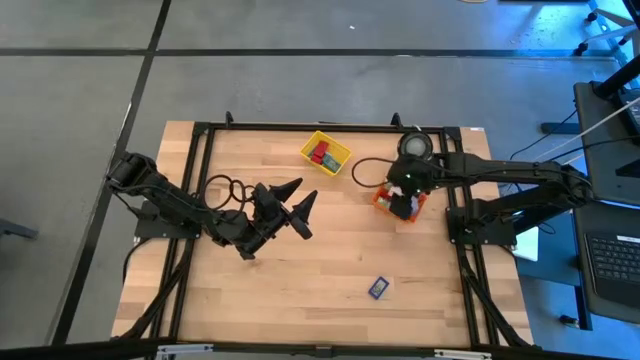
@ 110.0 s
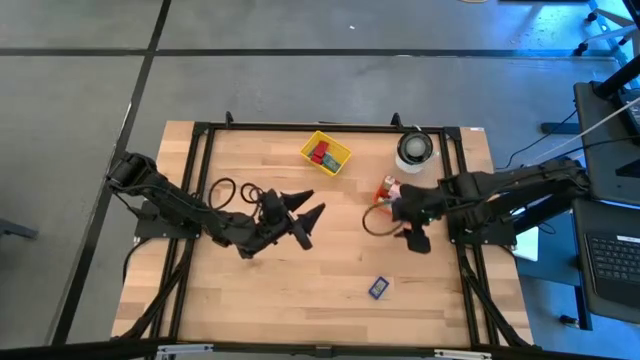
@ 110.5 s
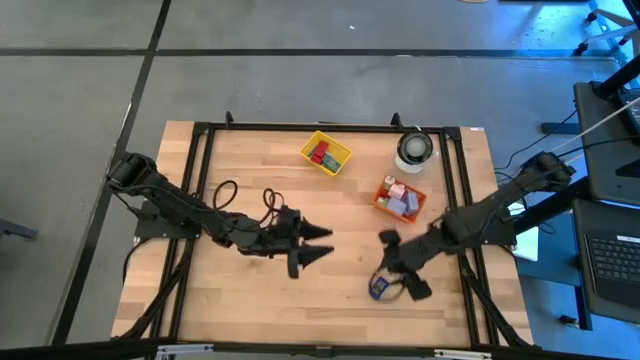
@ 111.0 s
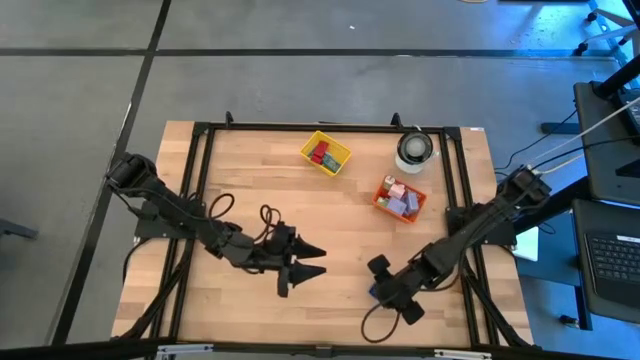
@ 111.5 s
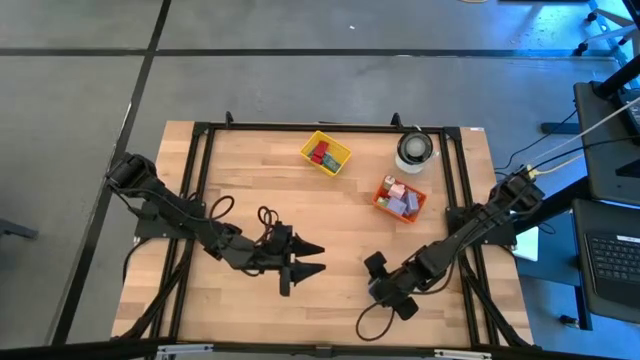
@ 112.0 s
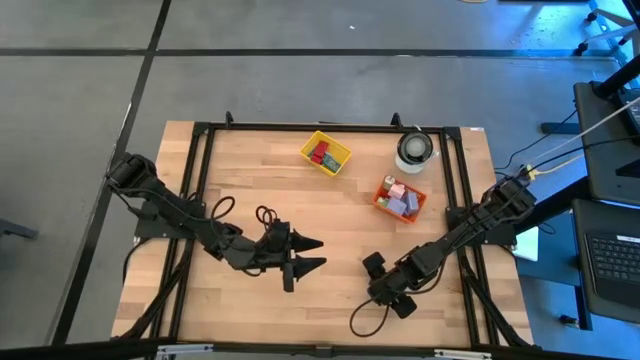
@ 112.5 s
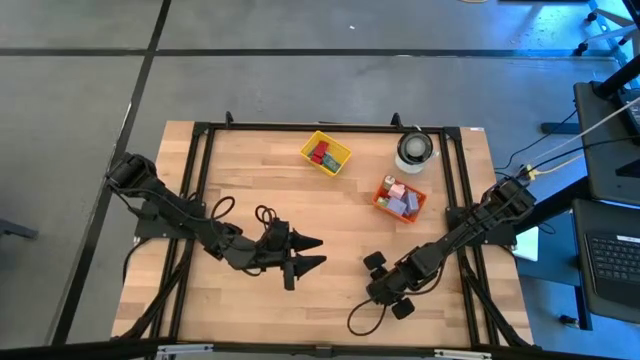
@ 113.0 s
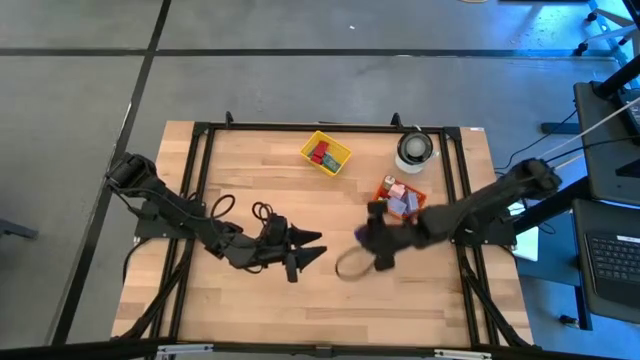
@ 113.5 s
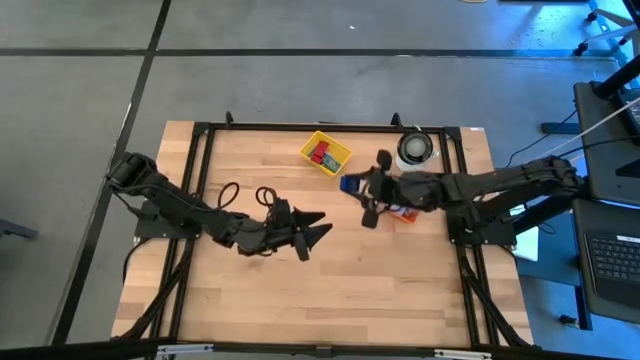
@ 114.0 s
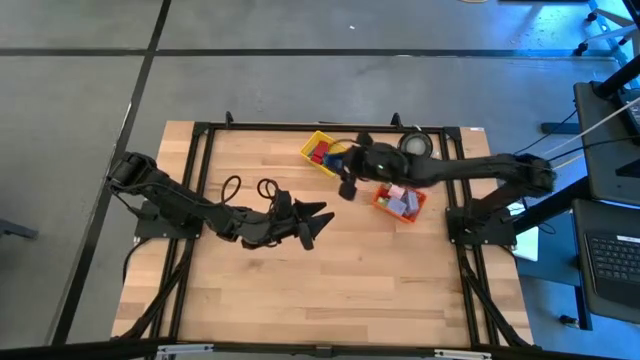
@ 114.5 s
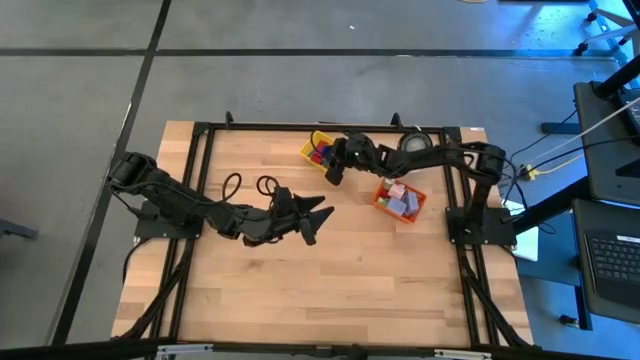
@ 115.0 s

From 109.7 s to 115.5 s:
Task: Pick & Place Office items
Put the blue digital clock into the yellow bin

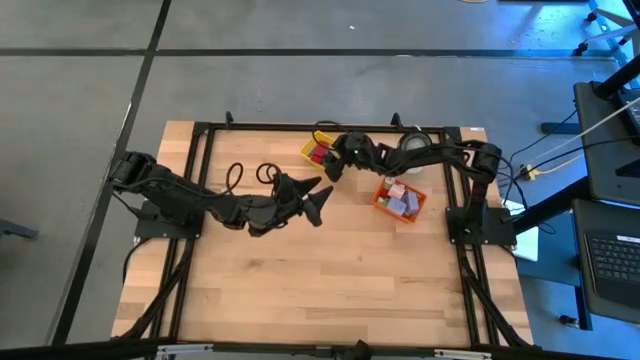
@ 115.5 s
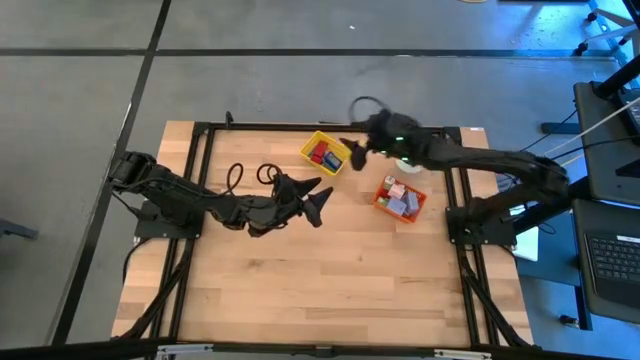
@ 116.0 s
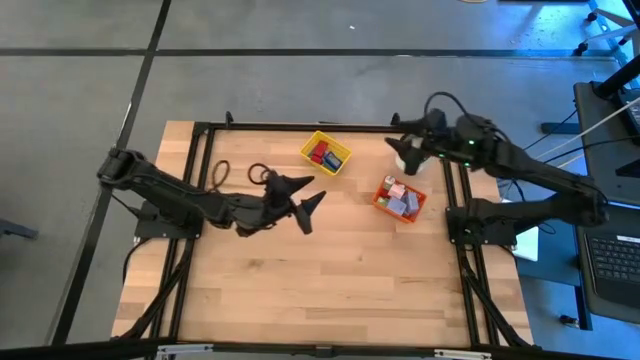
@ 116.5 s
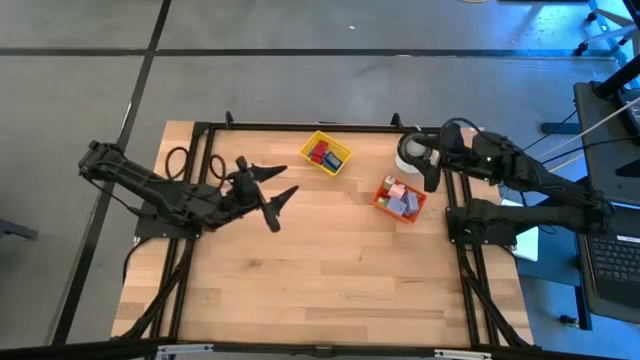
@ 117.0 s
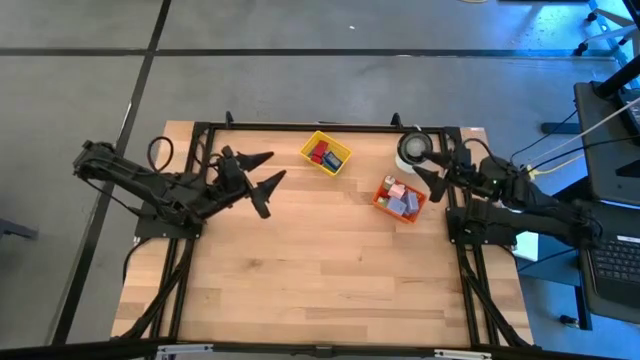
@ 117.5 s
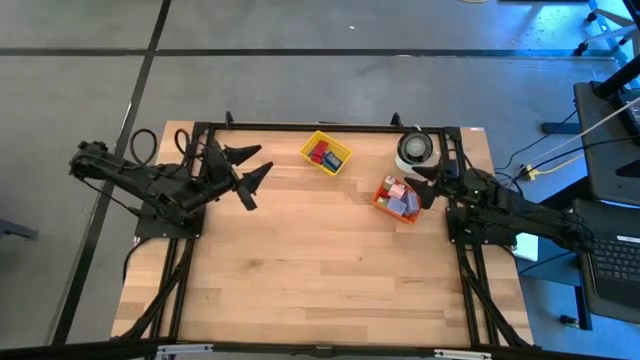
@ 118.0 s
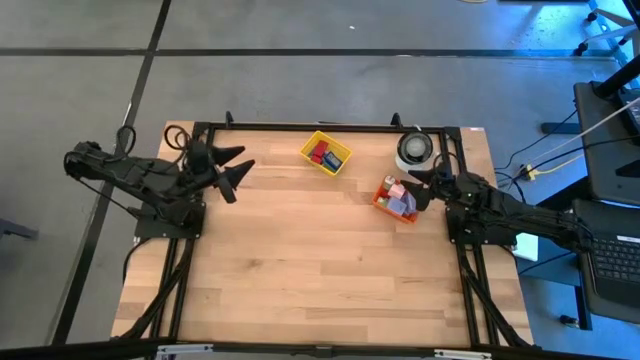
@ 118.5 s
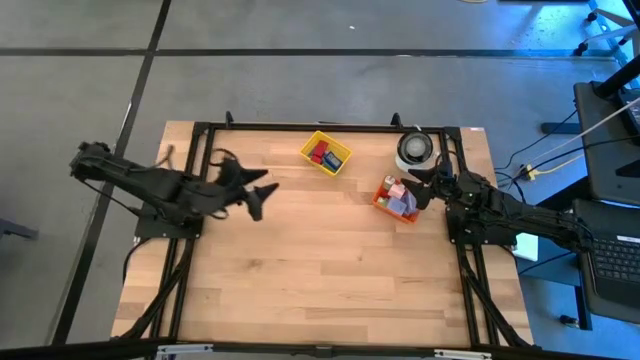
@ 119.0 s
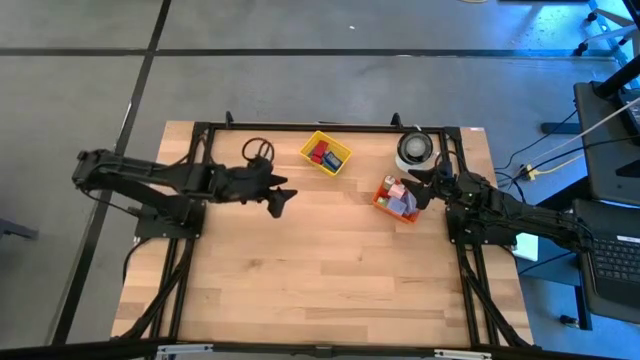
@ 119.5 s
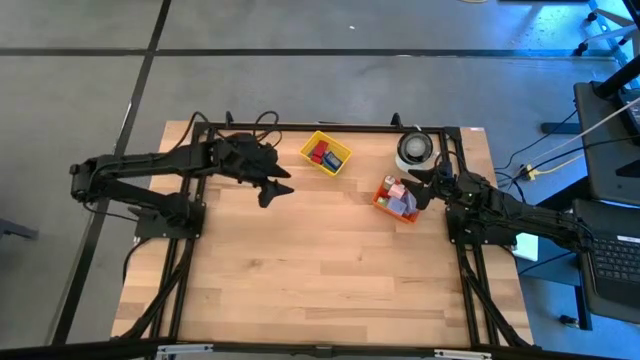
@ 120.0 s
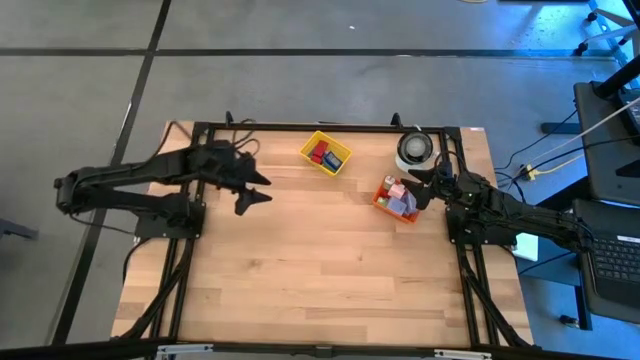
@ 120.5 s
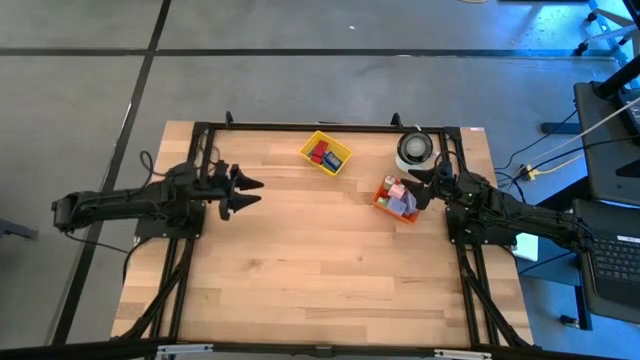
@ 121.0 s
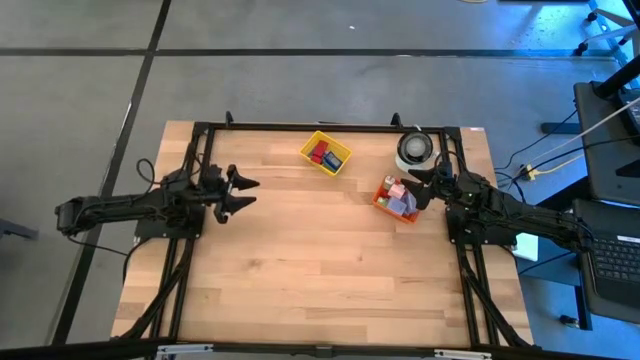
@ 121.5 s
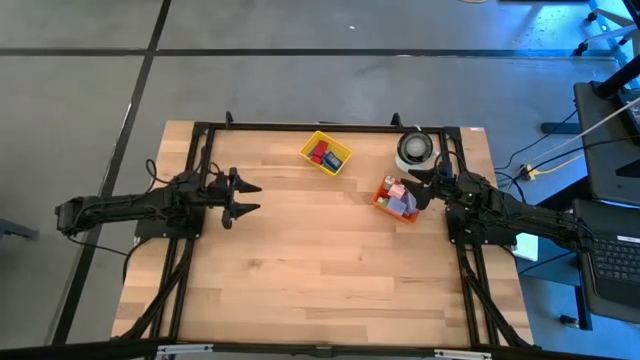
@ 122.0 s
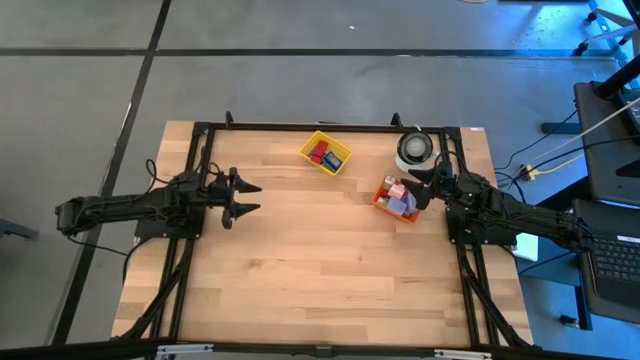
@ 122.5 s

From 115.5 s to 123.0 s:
Return to Home Position

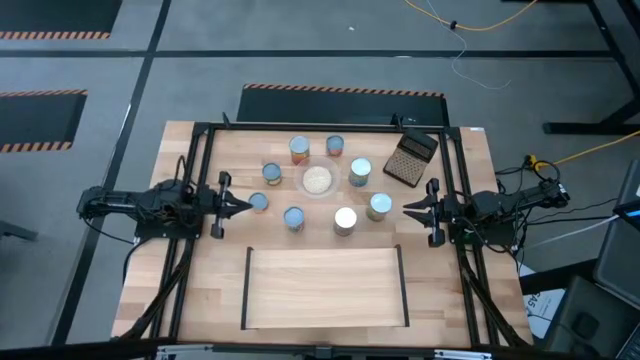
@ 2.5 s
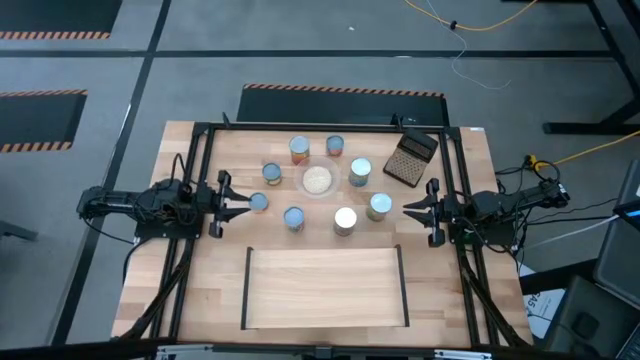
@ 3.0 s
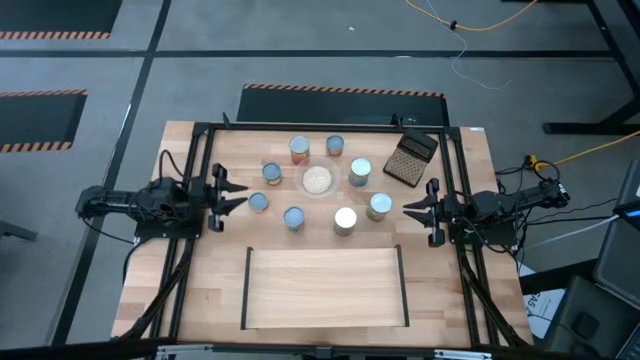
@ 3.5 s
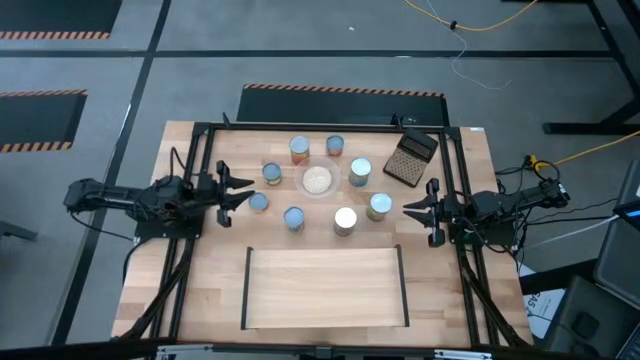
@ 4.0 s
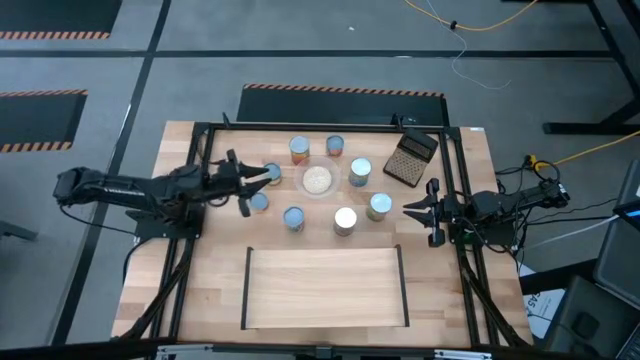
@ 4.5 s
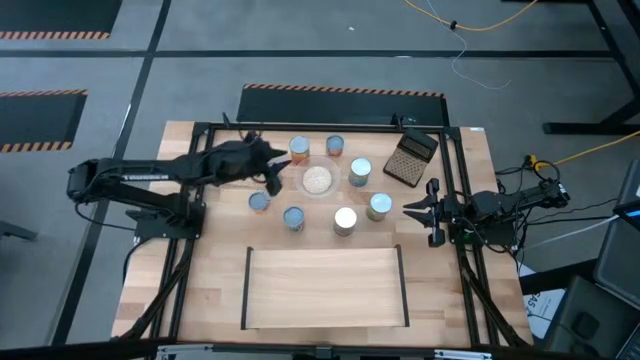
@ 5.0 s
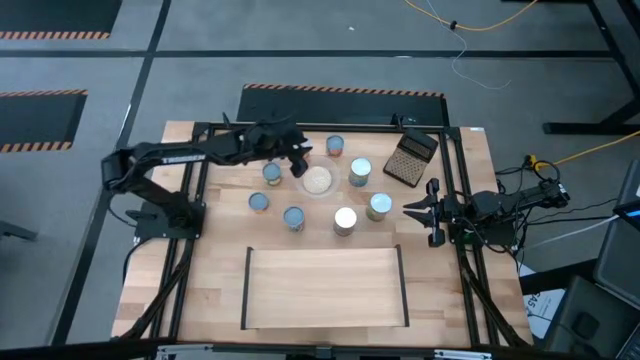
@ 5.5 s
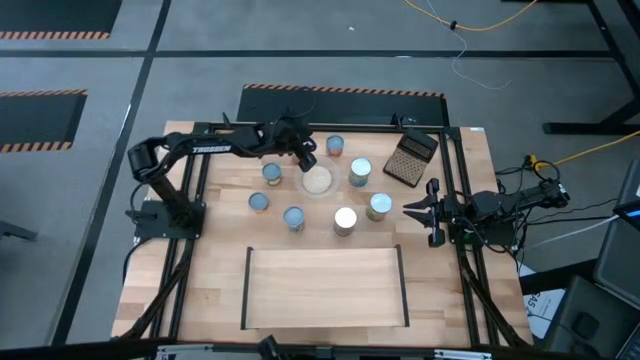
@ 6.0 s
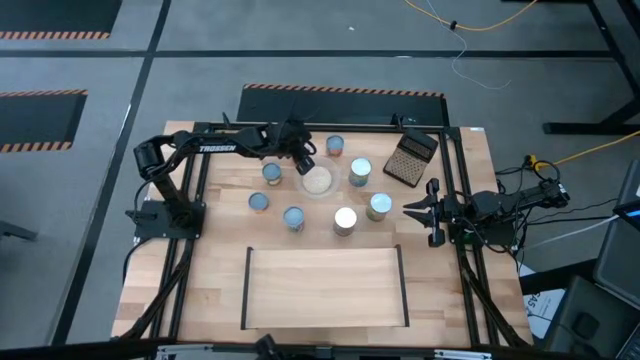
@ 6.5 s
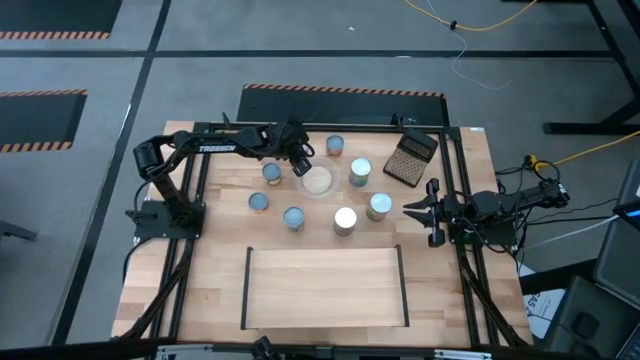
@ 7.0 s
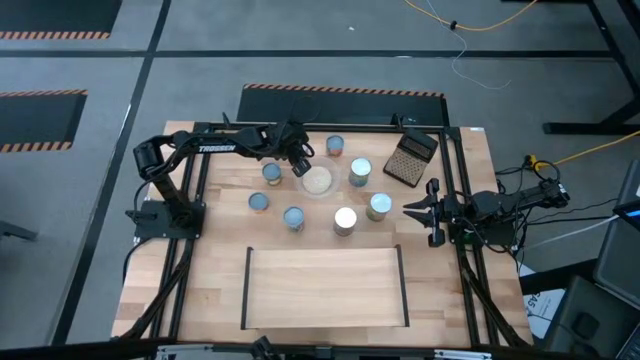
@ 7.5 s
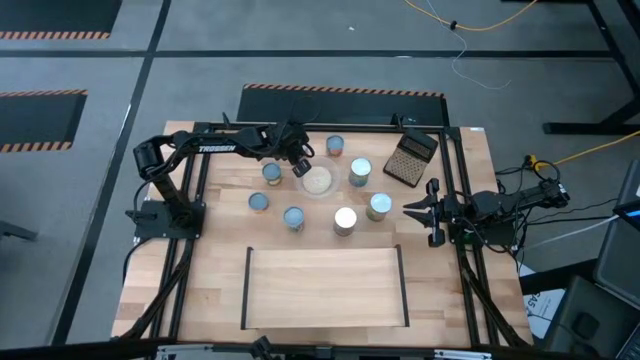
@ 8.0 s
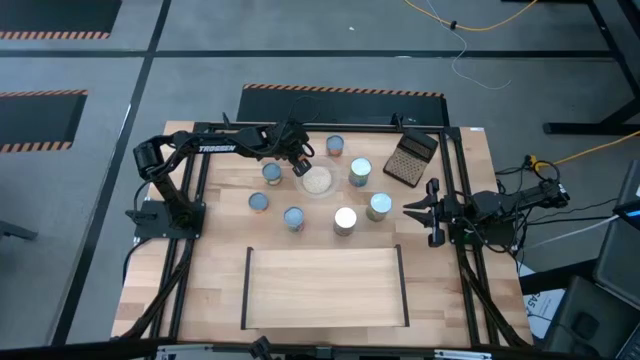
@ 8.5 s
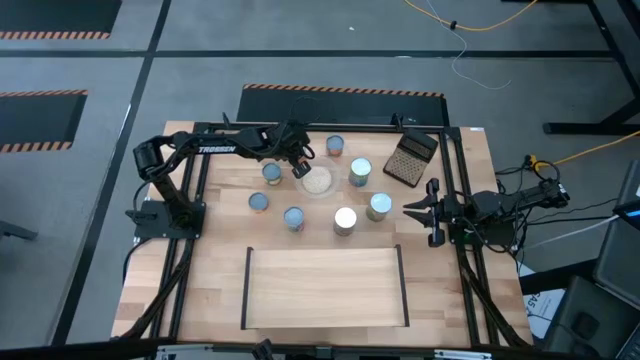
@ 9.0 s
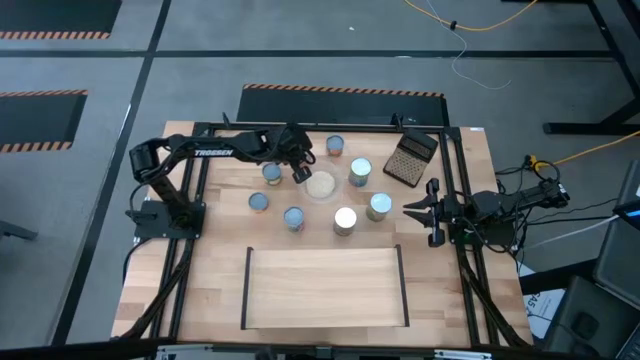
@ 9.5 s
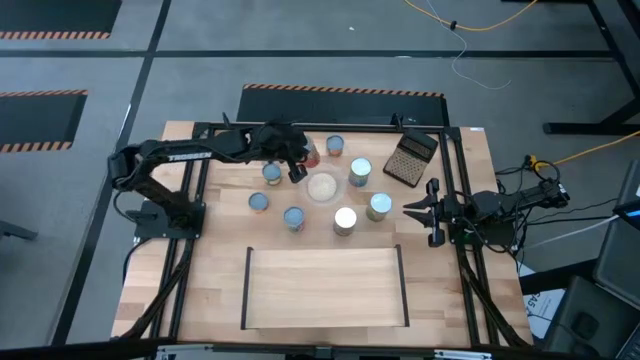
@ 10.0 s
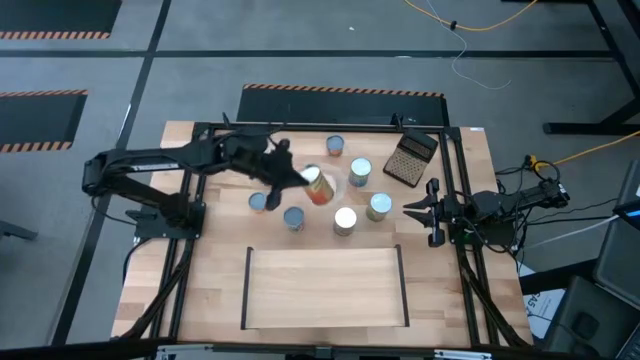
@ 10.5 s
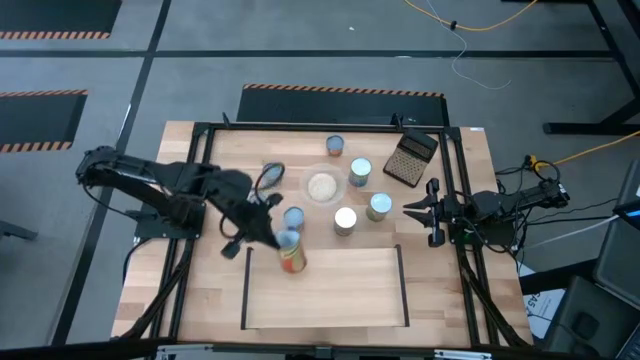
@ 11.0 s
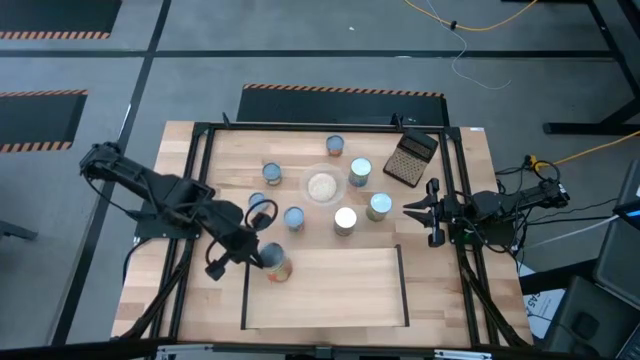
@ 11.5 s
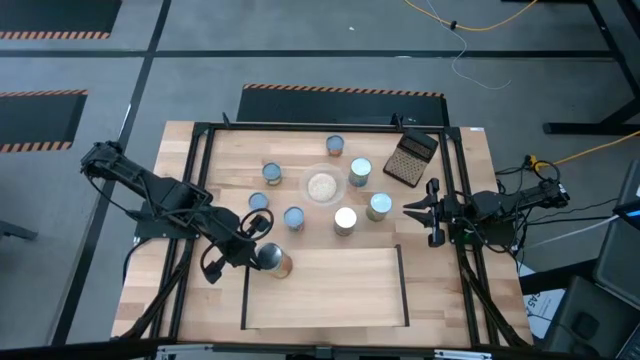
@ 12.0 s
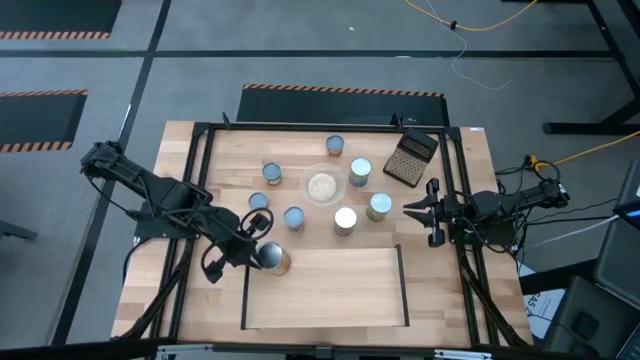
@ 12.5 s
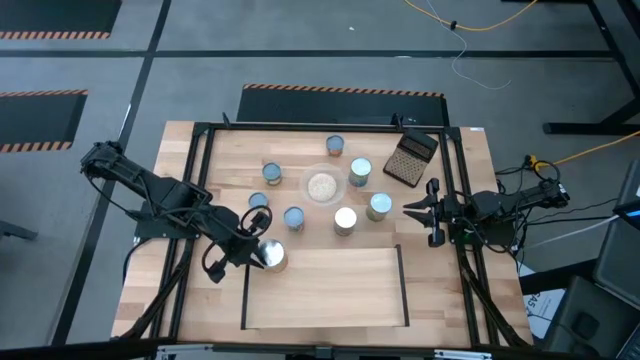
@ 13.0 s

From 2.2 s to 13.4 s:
Task: Pick and place cans onto a shelf
Put the canned pineapple on the shelf
